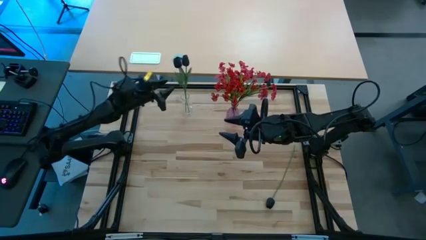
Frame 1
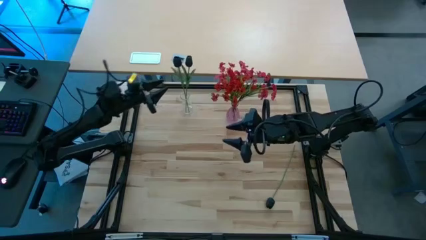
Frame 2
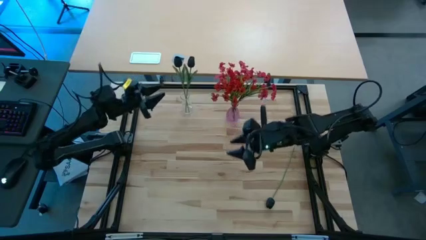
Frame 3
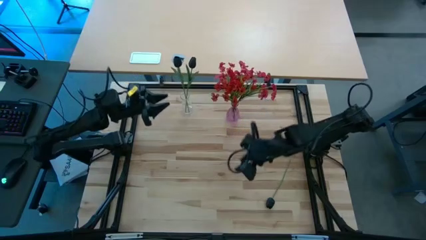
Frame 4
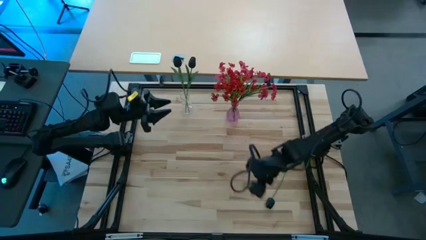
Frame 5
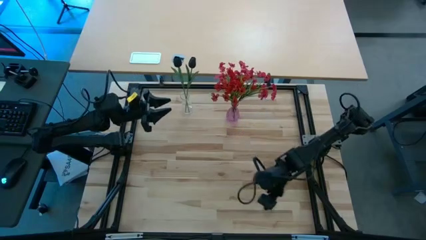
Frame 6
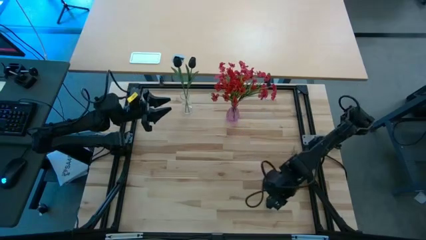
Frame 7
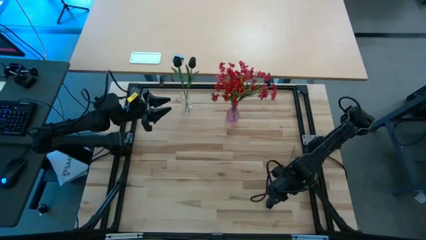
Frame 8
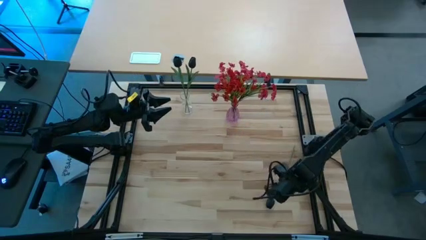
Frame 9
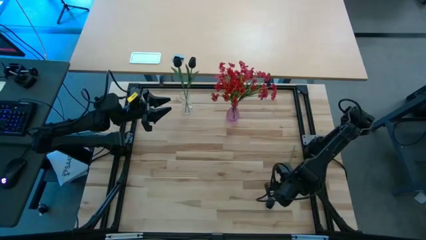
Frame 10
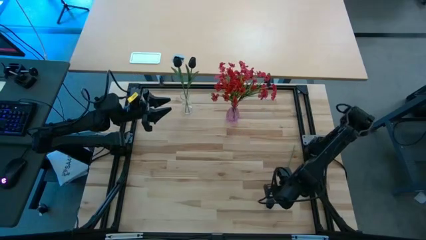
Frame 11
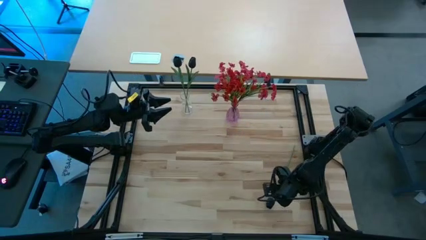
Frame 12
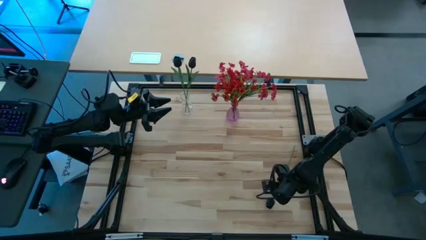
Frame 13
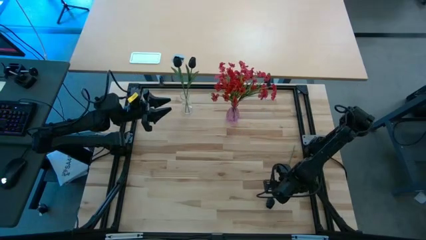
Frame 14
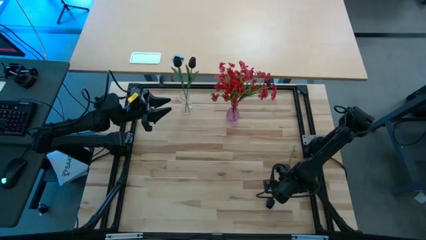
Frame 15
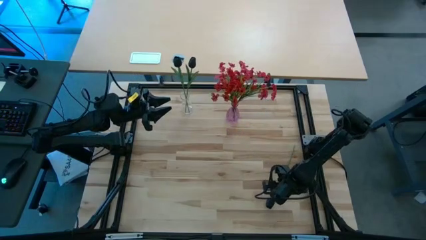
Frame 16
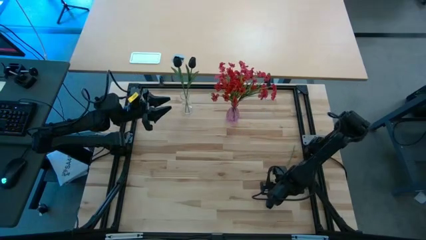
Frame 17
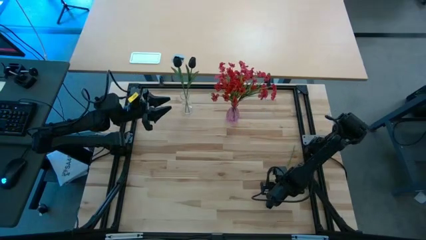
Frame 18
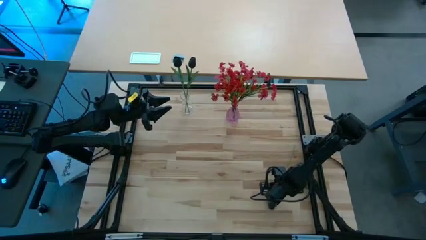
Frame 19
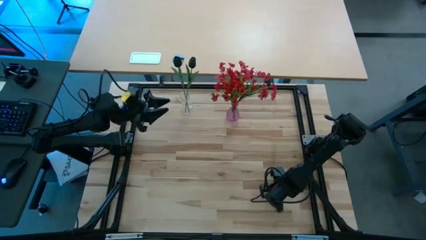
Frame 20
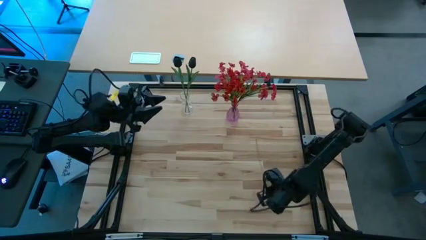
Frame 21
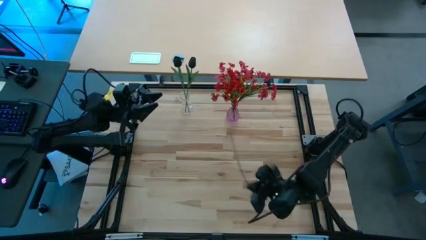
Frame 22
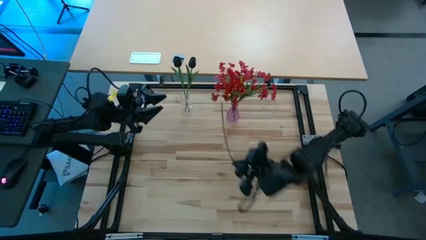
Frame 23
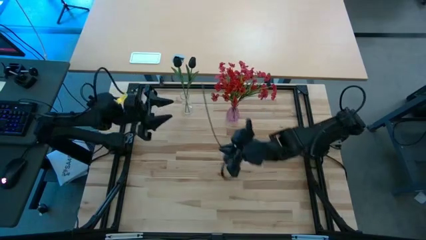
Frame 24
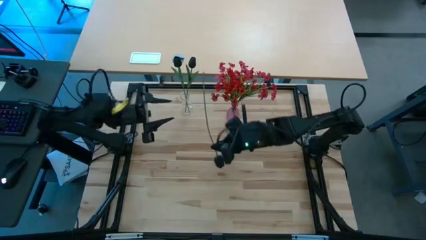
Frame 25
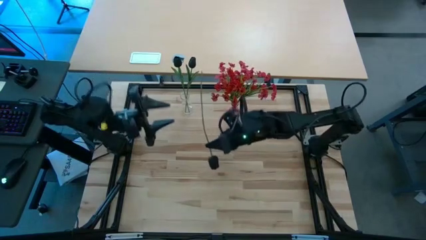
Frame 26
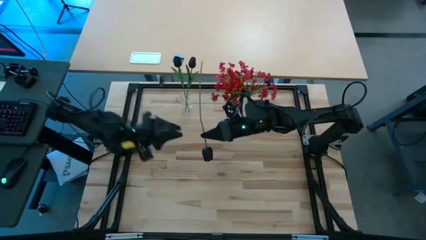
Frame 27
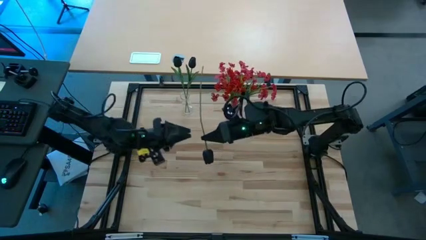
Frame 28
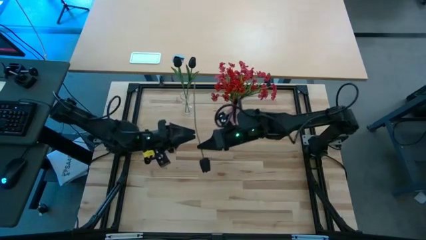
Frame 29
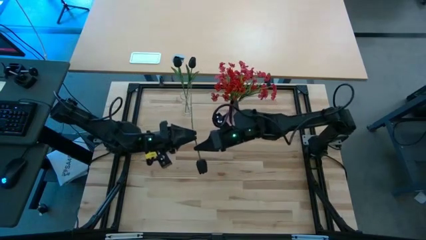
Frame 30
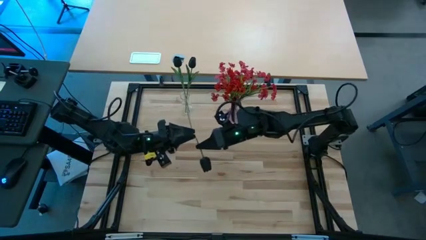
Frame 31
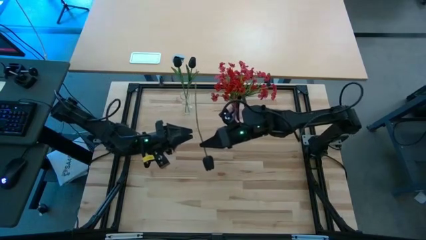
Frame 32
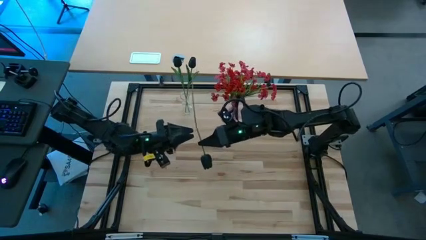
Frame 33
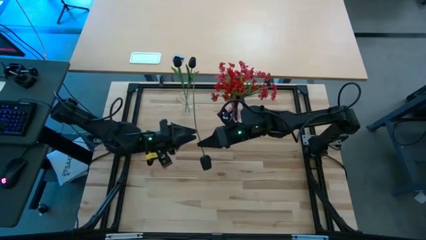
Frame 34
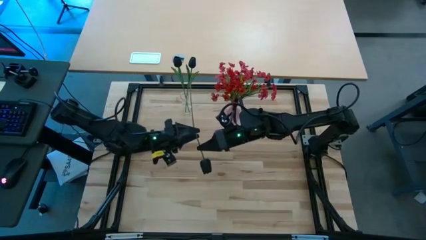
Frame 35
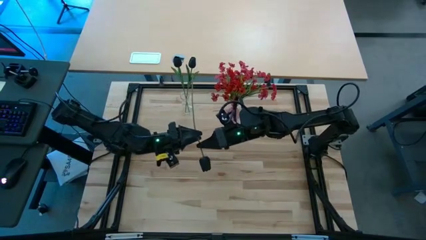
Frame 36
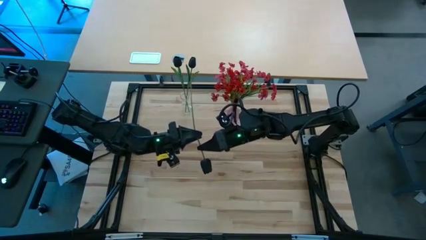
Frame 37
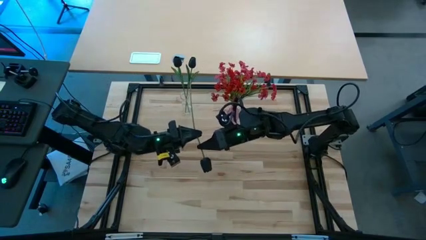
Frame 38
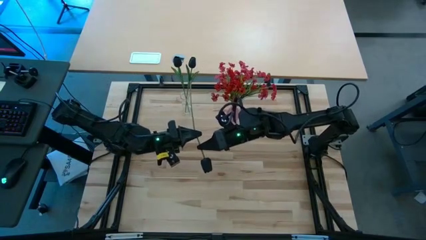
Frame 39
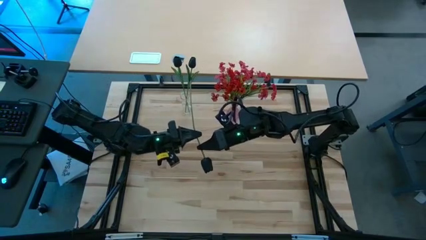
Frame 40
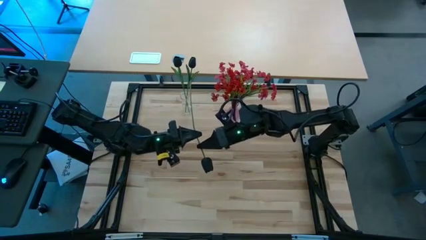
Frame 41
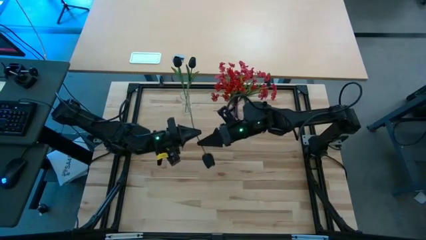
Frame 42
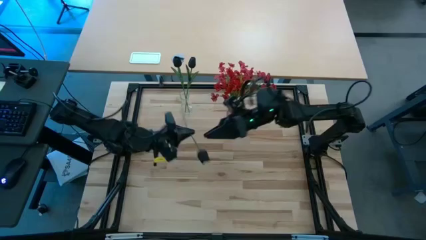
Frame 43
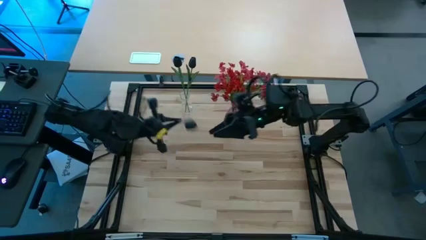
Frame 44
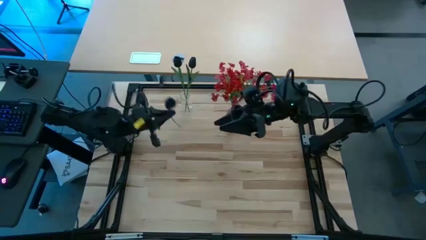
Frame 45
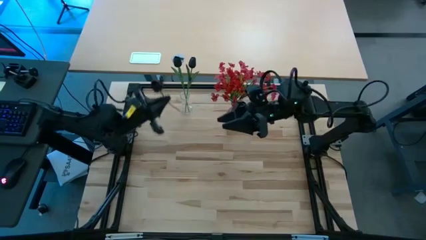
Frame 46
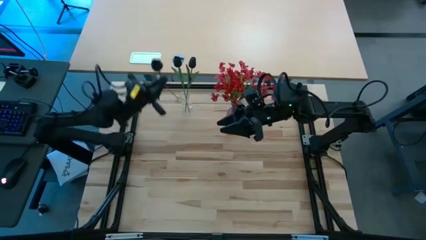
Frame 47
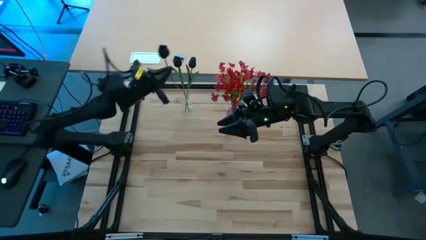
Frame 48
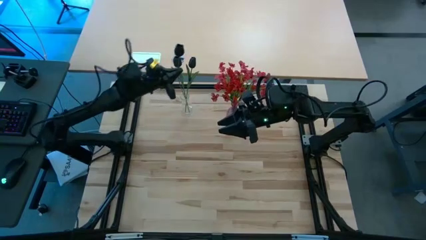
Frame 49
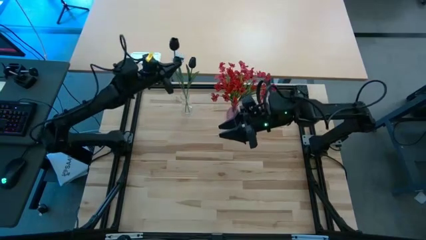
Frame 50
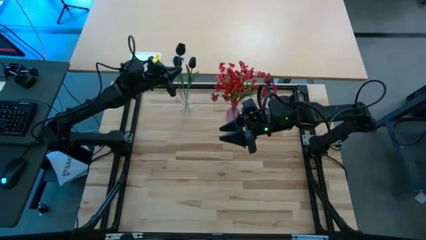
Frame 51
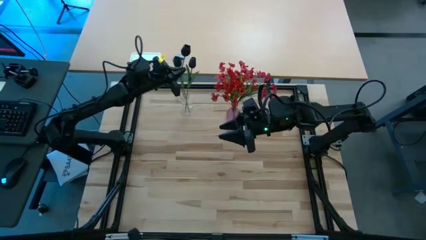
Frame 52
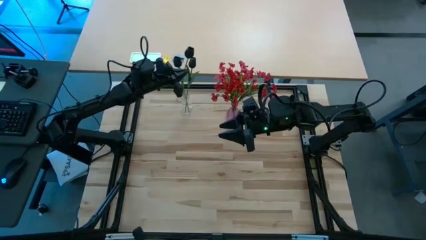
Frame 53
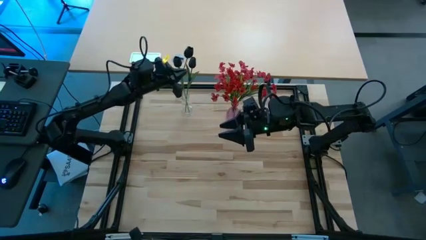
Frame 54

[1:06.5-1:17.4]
Task: Sort flowers into vase by color
Put the black tulip into the transparent vase
